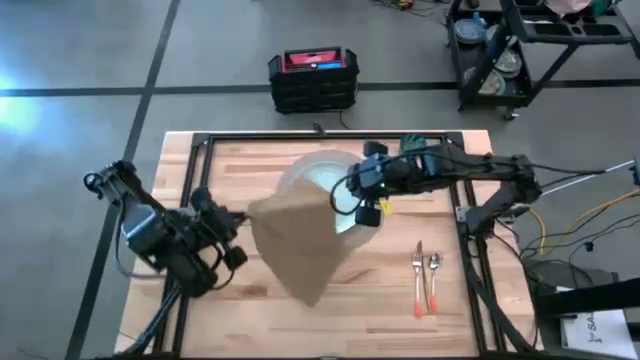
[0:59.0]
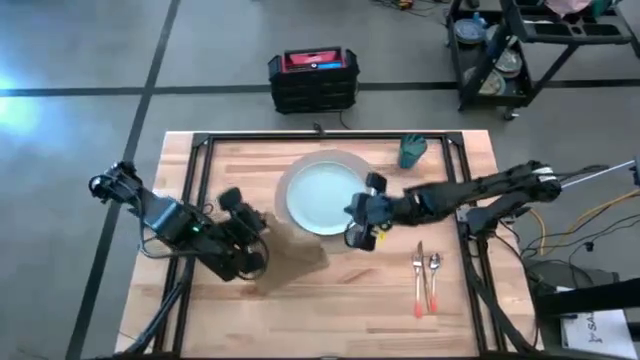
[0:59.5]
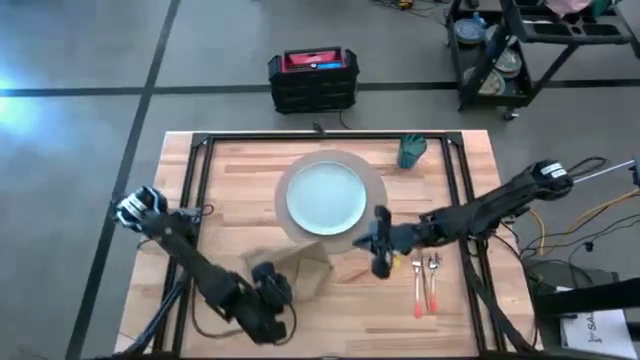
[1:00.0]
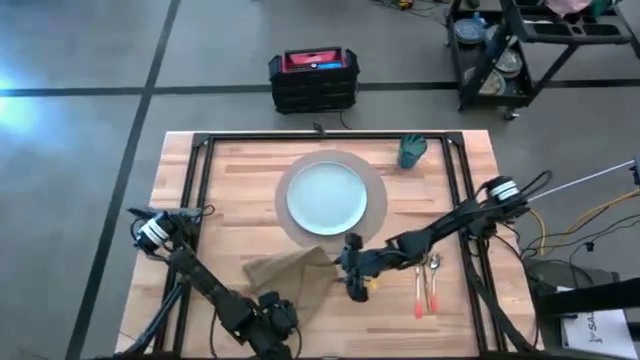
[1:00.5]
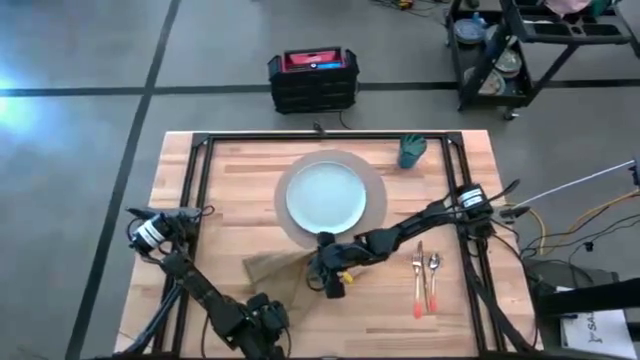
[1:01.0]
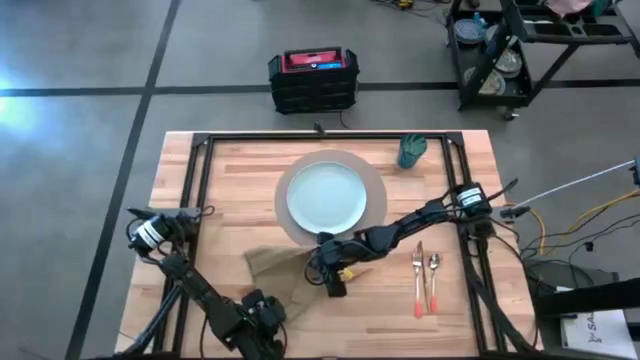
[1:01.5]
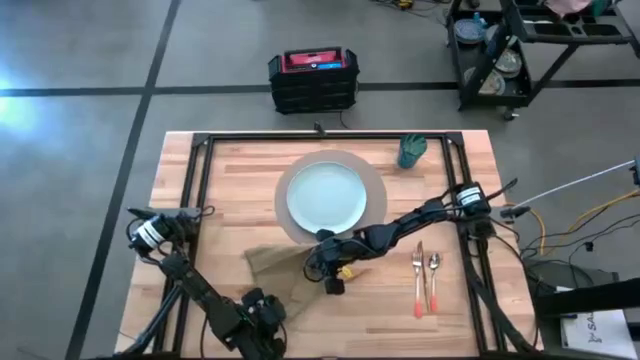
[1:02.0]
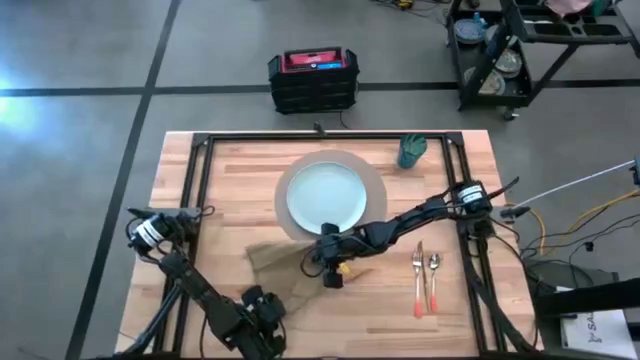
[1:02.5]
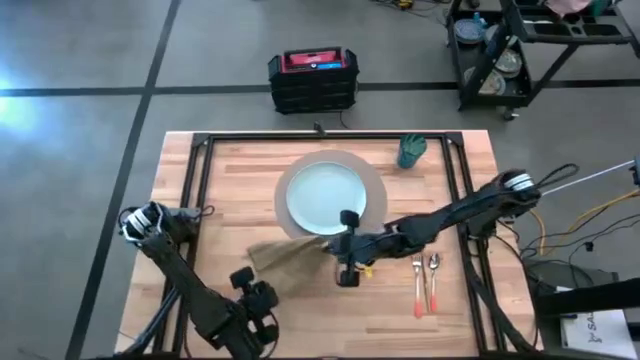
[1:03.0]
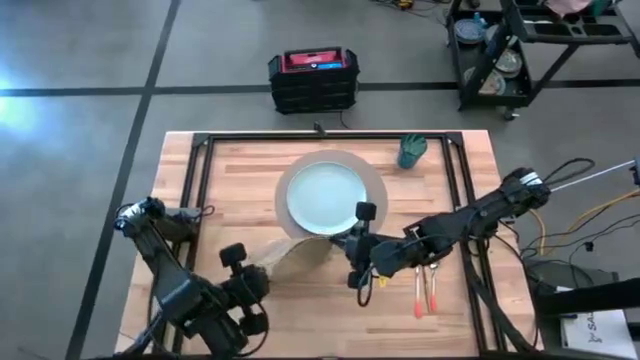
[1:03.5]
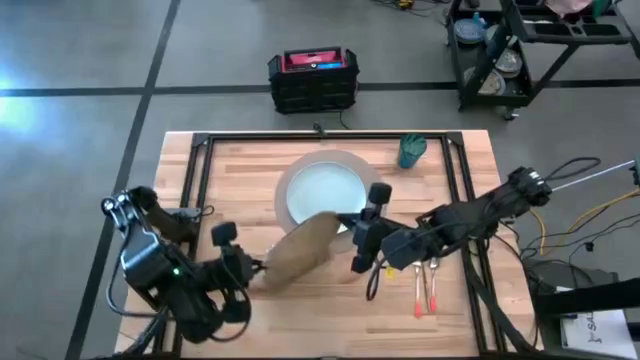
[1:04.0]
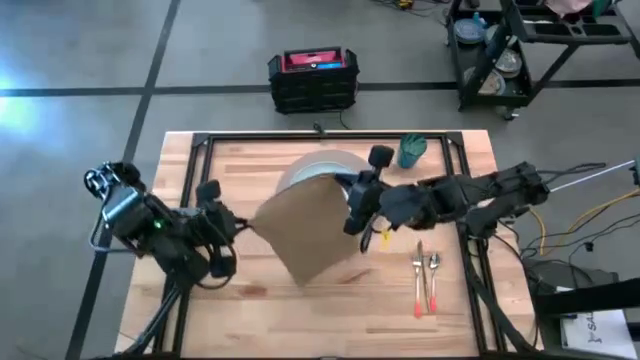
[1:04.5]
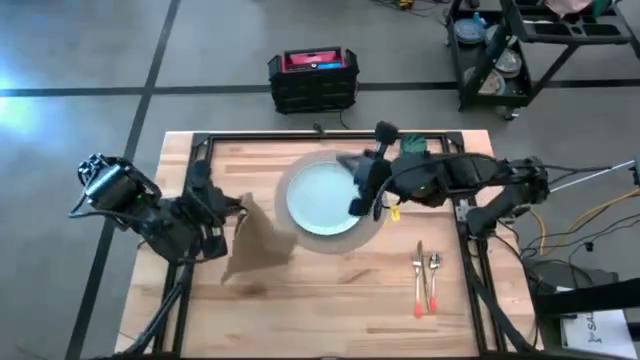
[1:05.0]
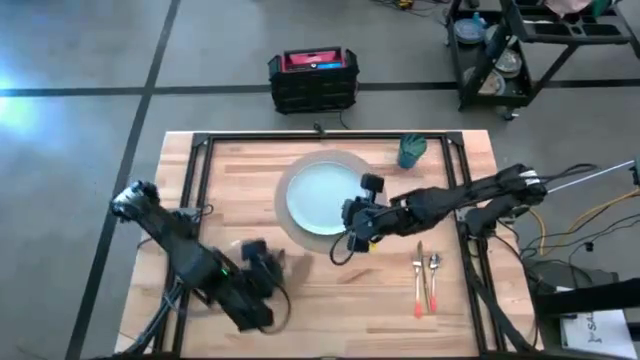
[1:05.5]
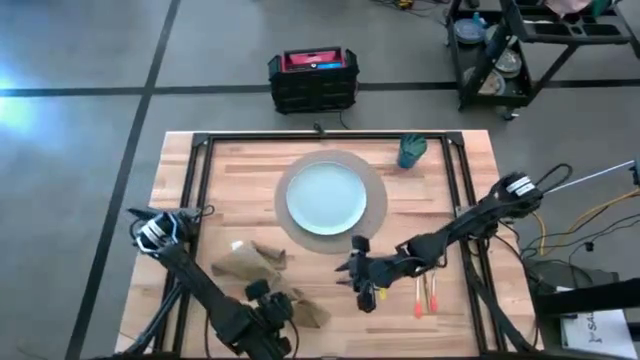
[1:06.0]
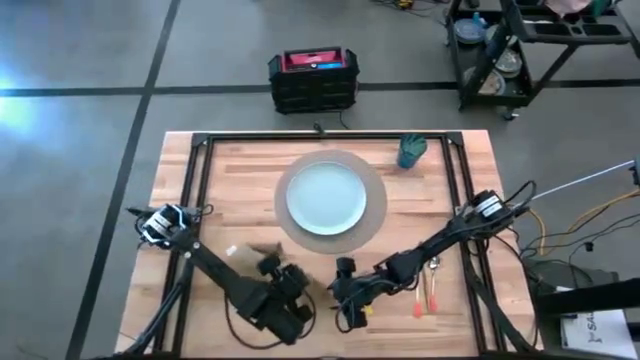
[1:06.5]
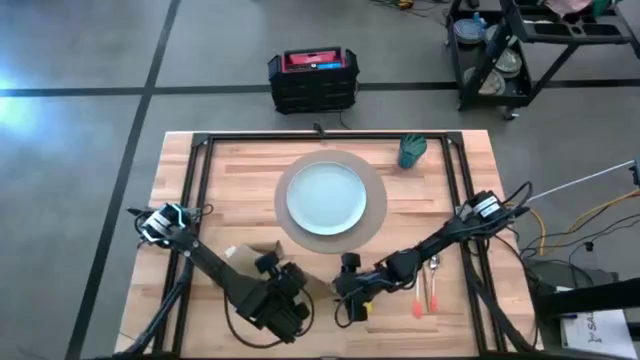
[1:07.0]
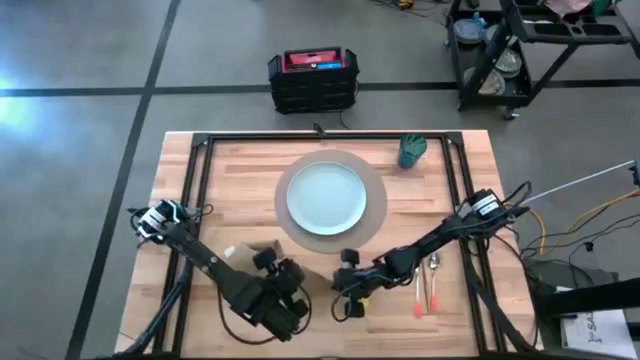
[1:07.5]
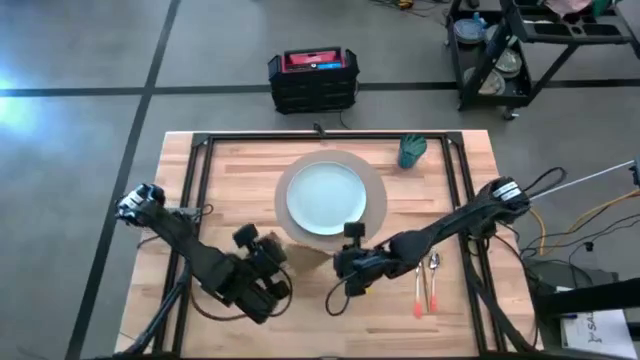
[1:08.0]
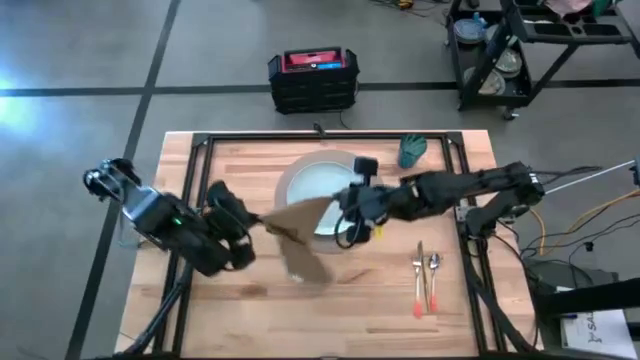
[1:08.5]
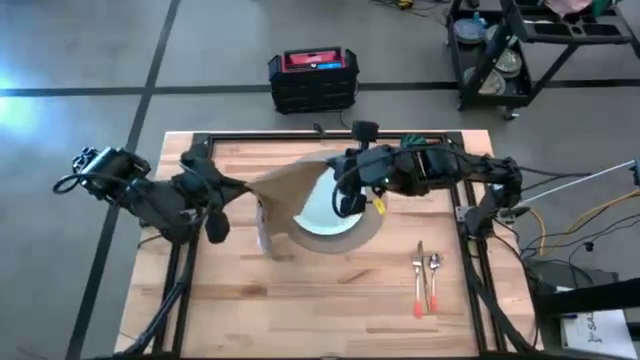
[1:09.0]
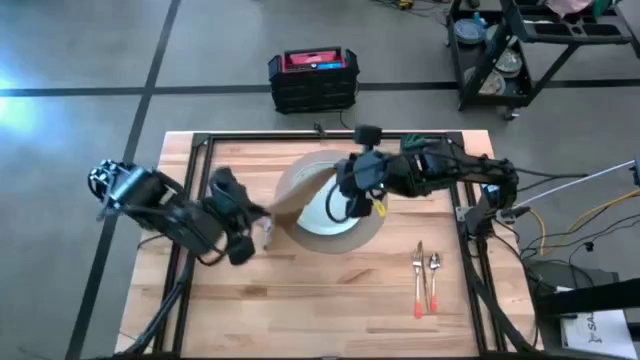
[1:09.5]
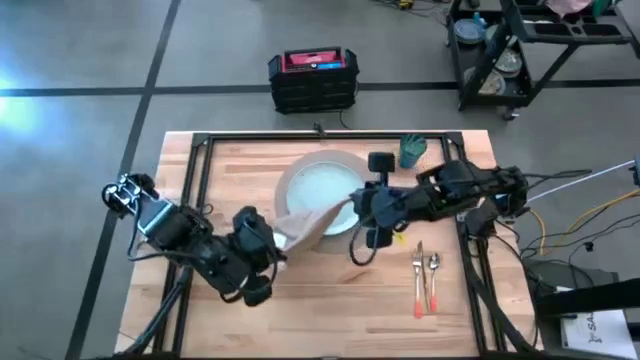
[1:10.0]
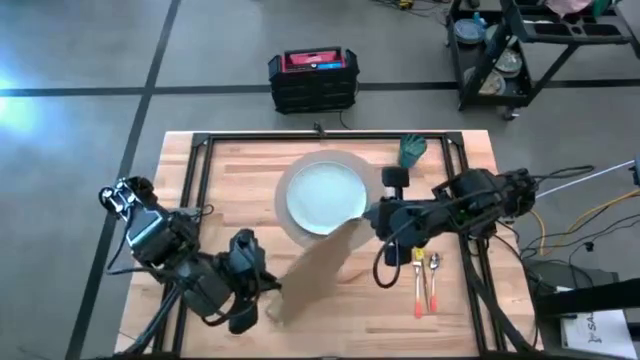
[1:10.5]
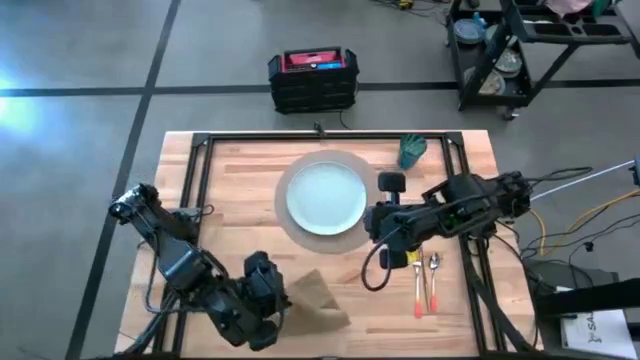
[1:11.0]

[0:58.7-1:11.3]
Task: Set table place
Fold the brown table napkin

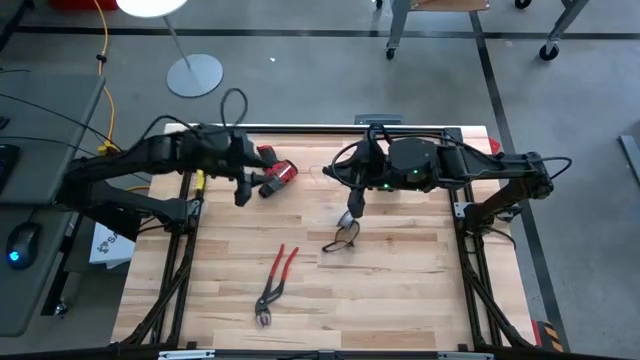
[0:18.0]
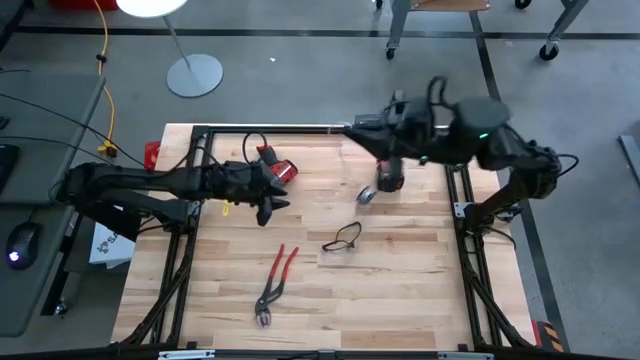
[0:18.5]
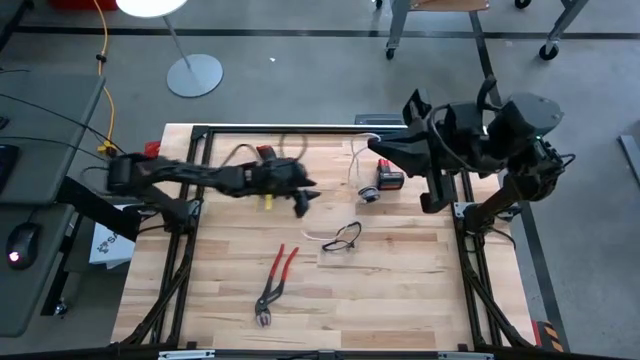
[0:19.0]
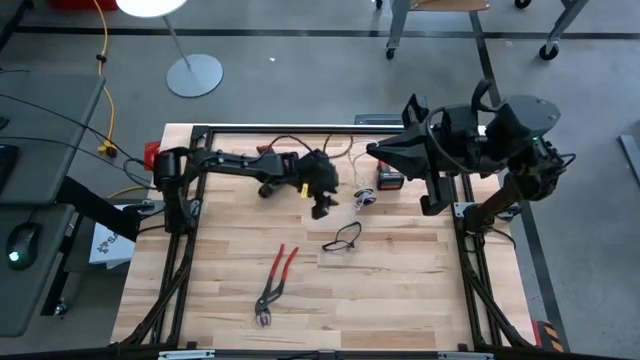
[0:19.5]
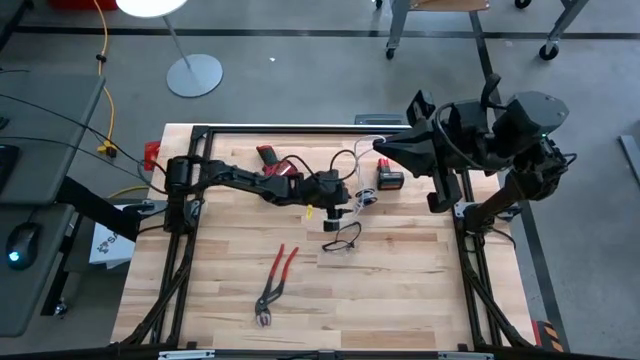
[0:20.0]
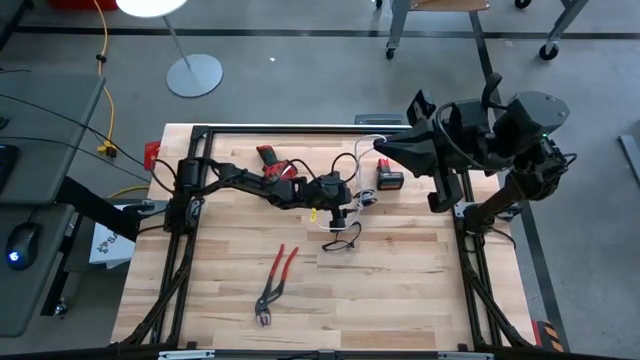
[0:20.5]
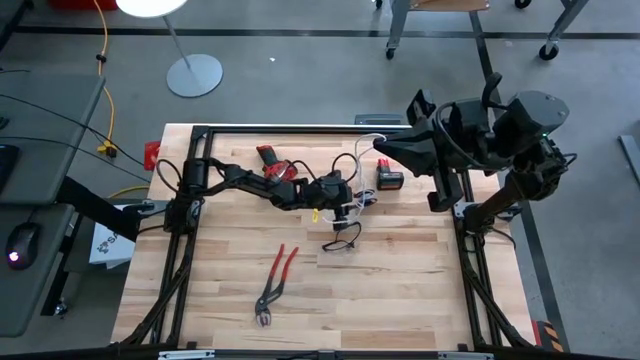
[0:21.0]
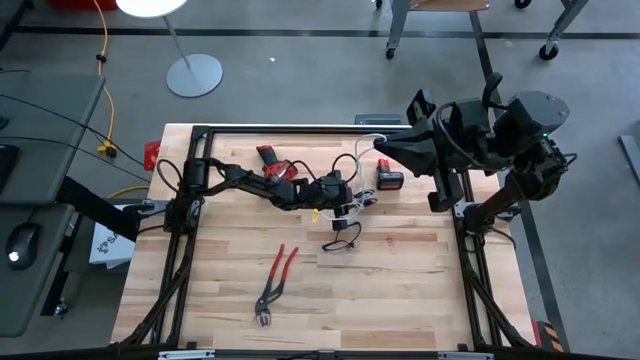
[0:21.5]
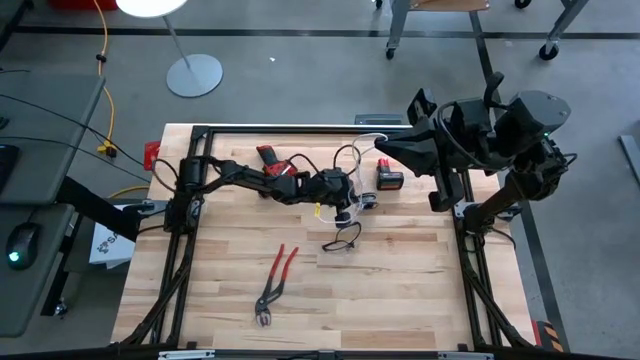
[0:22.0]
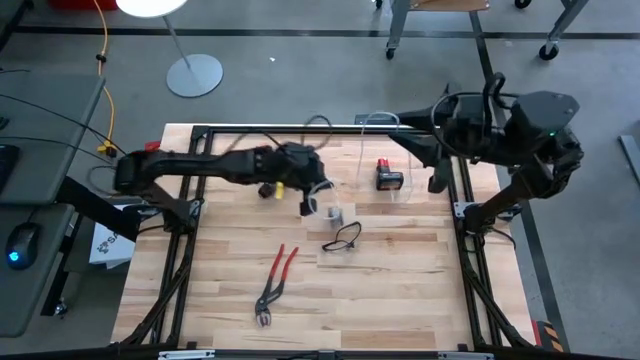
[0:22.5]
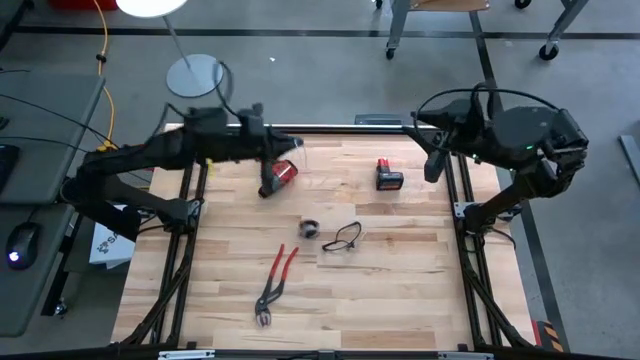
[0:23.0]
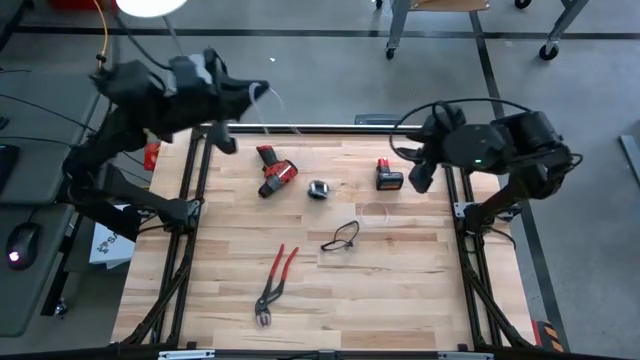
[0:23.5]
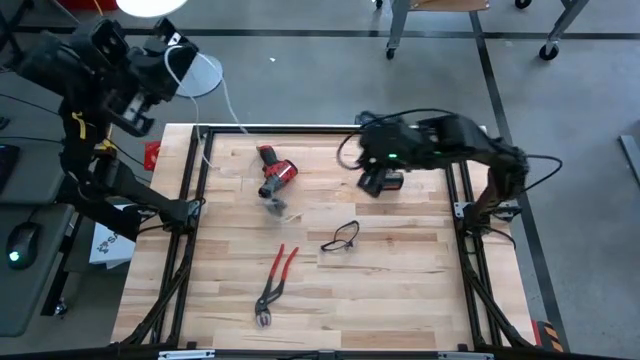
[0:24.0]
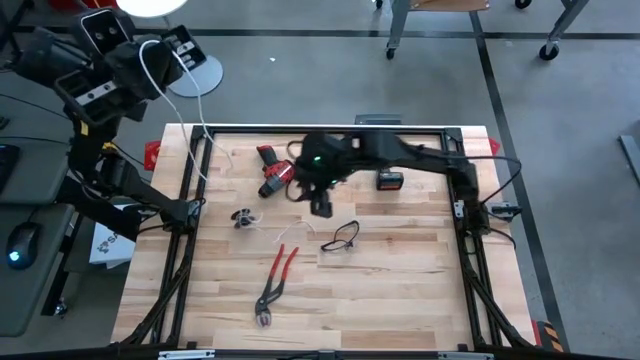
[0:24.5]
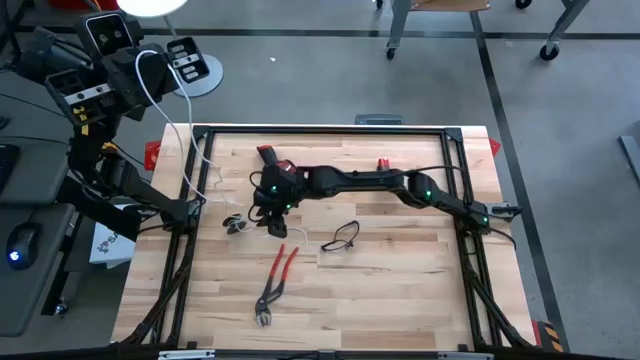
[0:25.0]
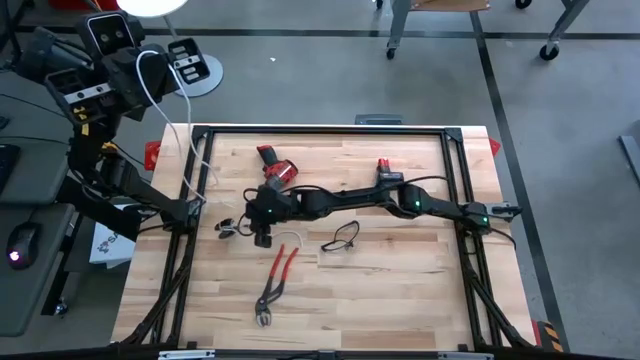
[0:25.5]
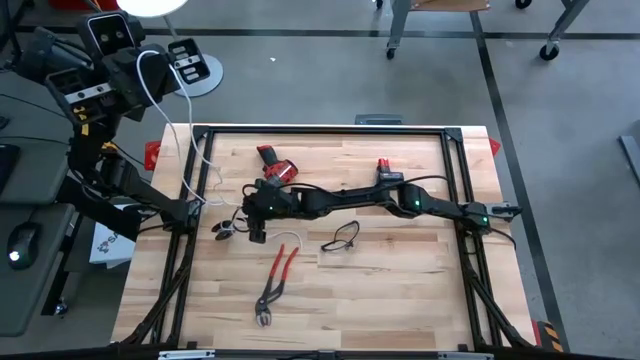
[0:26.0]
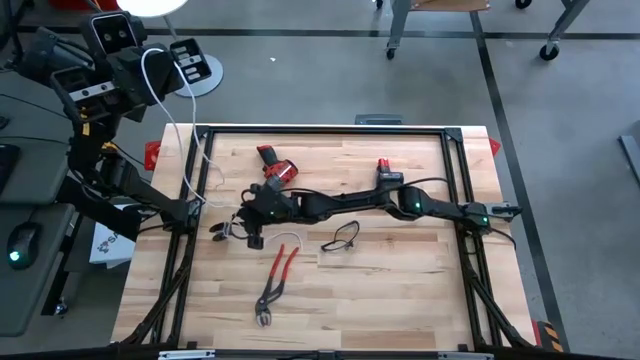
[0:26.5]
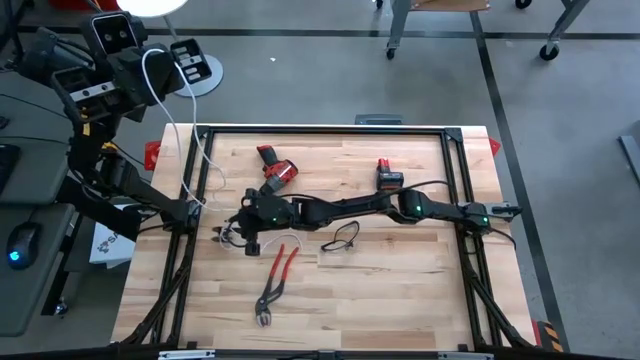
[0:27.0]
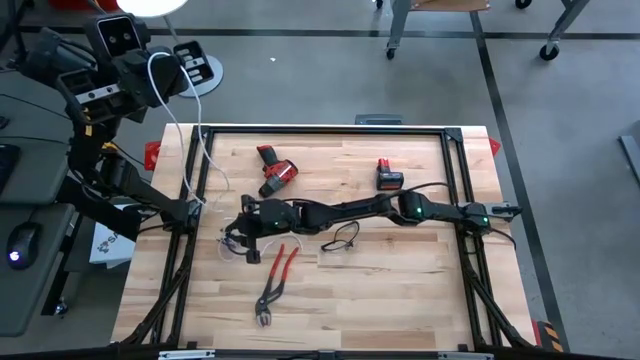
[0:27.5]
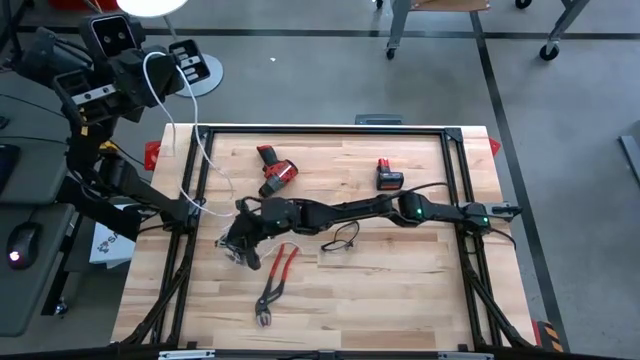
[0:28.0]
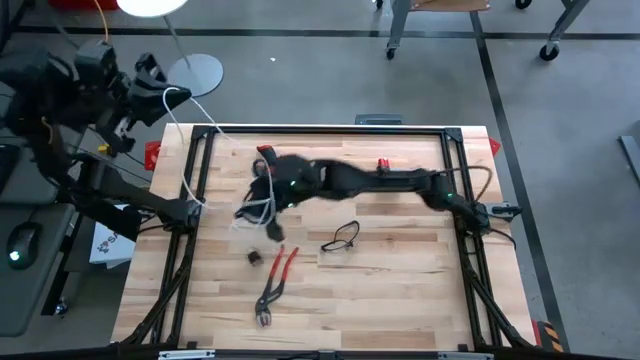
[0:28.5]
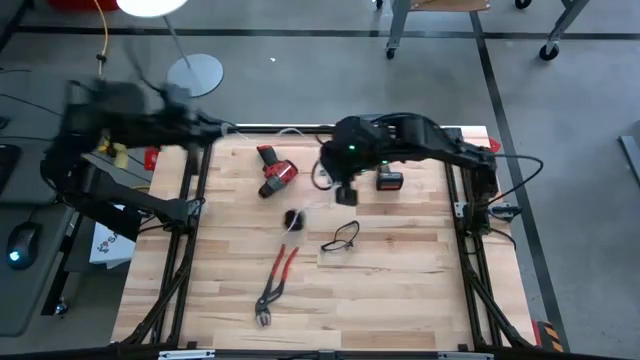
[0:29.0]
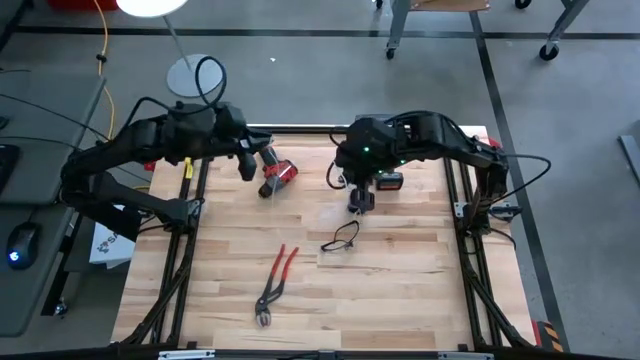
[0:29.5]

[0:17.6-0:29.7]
Task: Coil cords
Uncoil the white wire from the black spool
